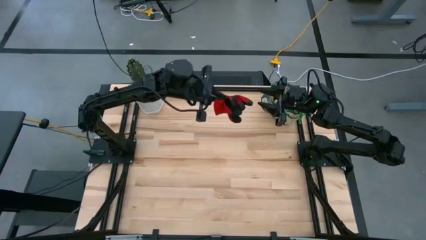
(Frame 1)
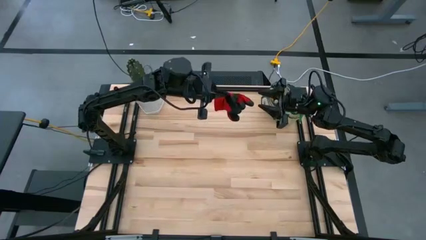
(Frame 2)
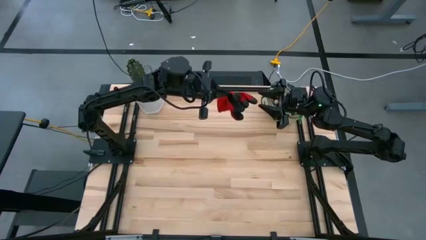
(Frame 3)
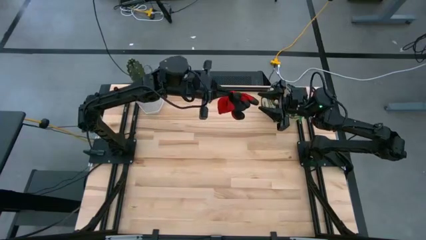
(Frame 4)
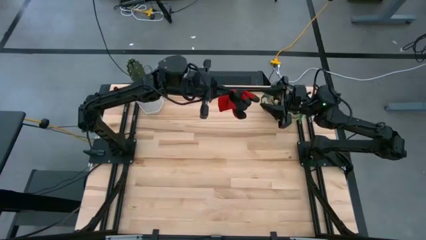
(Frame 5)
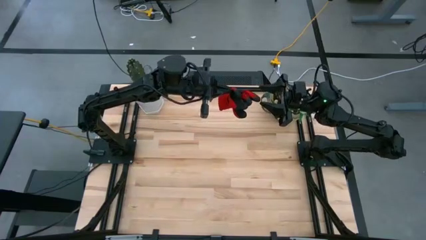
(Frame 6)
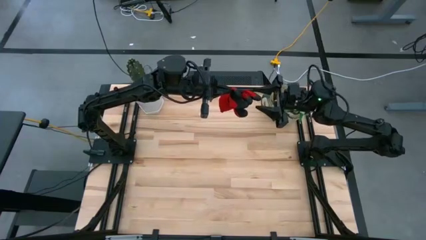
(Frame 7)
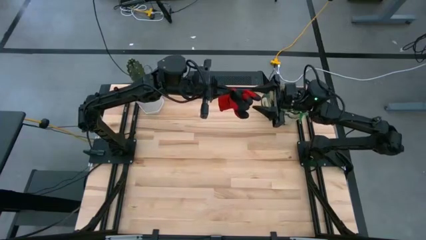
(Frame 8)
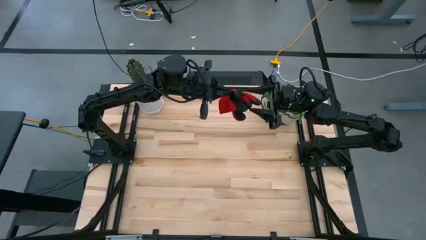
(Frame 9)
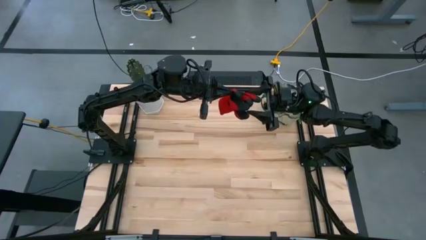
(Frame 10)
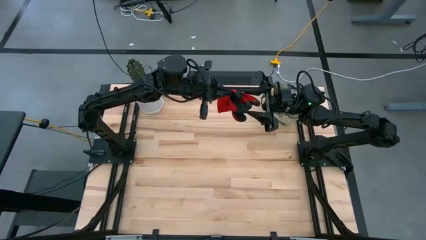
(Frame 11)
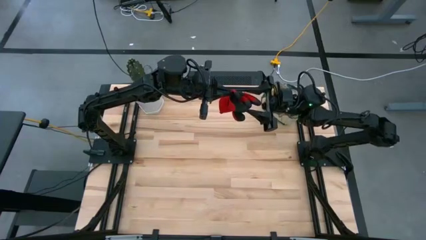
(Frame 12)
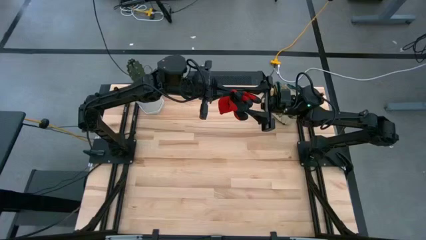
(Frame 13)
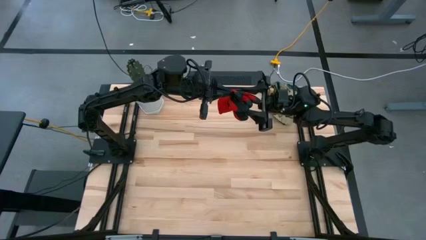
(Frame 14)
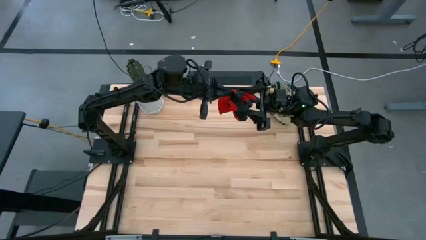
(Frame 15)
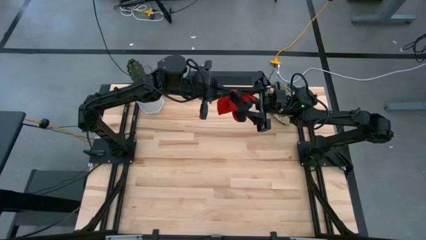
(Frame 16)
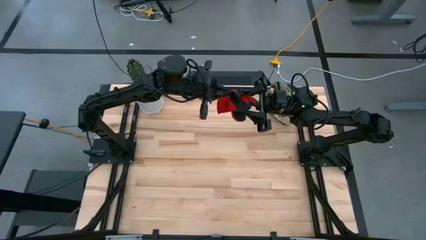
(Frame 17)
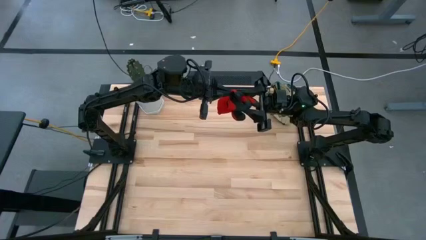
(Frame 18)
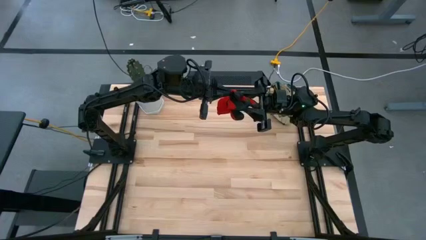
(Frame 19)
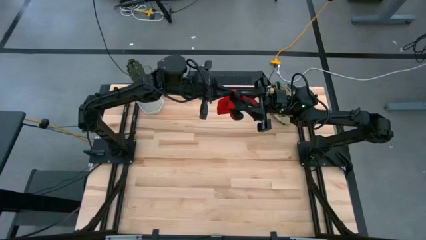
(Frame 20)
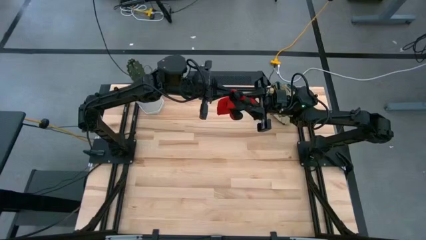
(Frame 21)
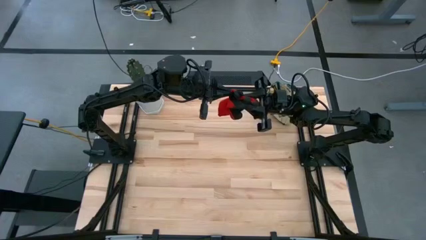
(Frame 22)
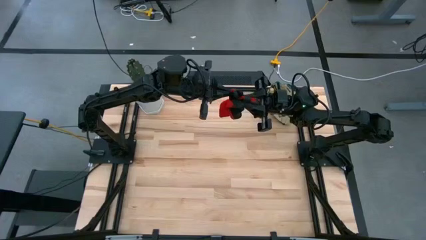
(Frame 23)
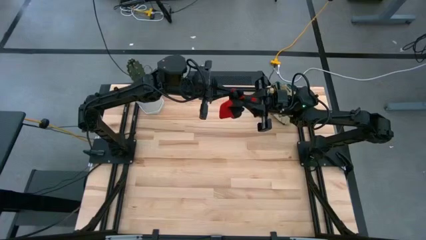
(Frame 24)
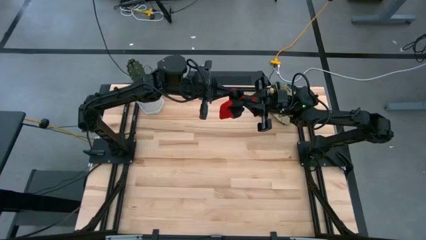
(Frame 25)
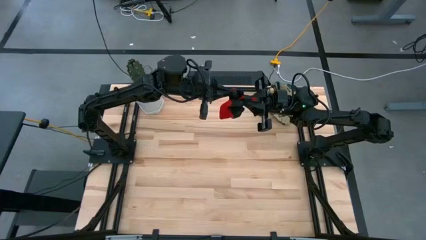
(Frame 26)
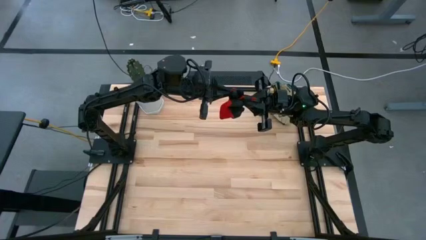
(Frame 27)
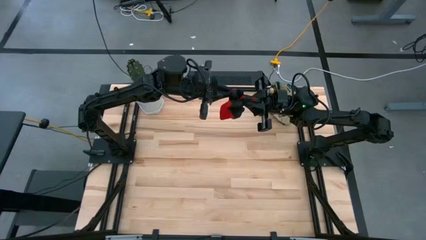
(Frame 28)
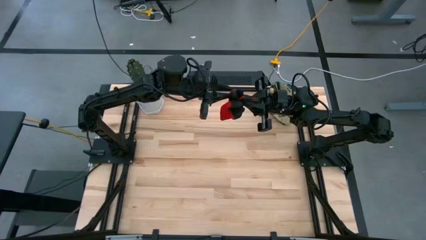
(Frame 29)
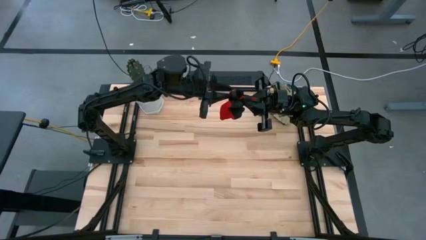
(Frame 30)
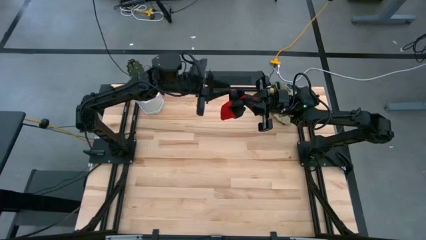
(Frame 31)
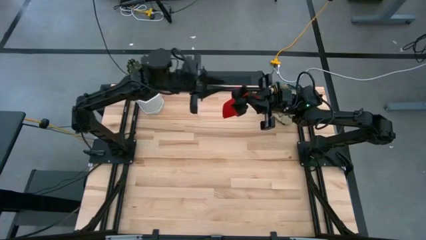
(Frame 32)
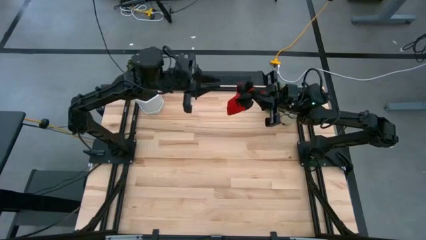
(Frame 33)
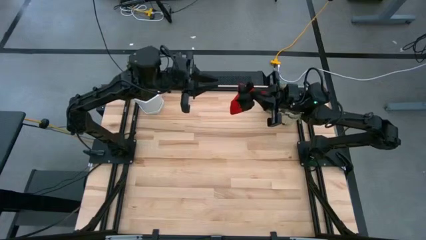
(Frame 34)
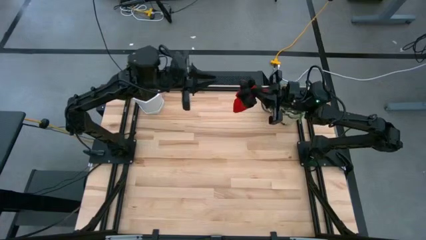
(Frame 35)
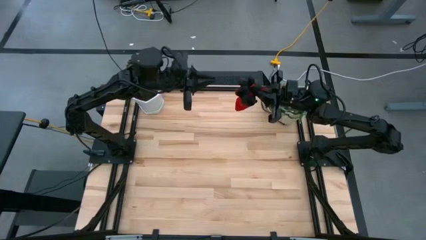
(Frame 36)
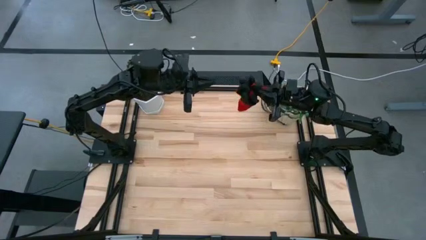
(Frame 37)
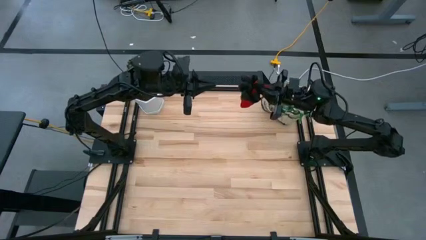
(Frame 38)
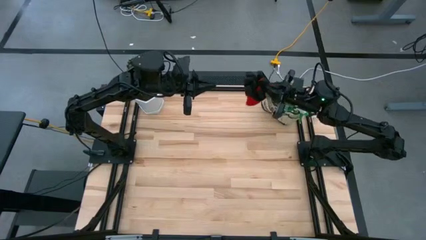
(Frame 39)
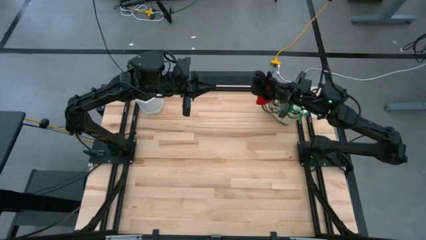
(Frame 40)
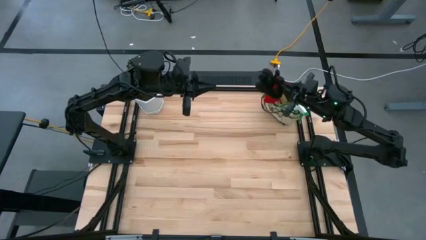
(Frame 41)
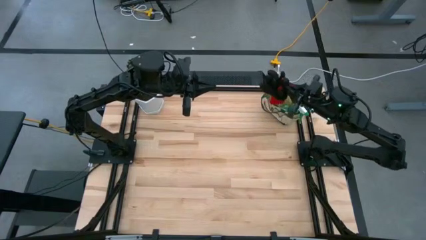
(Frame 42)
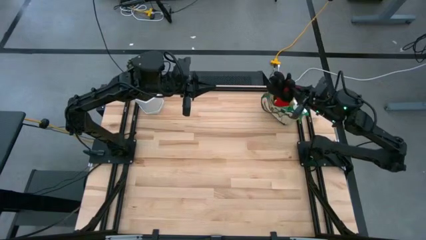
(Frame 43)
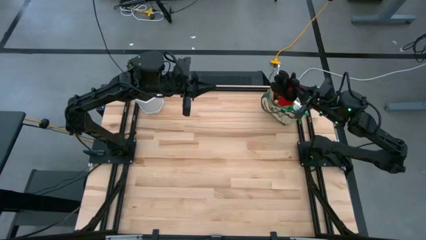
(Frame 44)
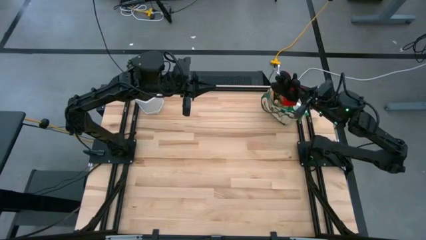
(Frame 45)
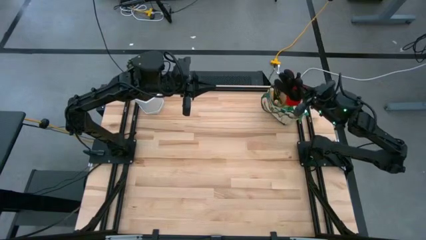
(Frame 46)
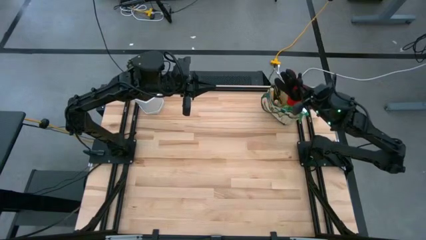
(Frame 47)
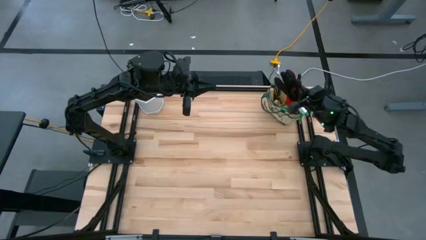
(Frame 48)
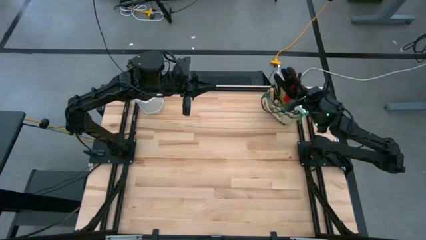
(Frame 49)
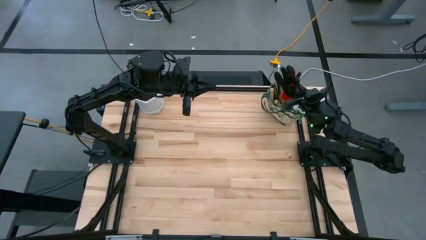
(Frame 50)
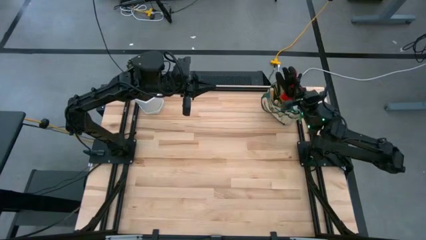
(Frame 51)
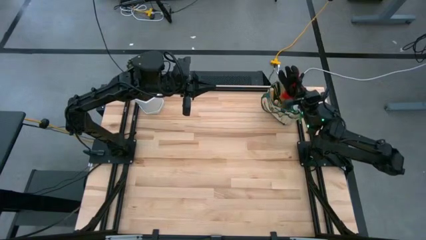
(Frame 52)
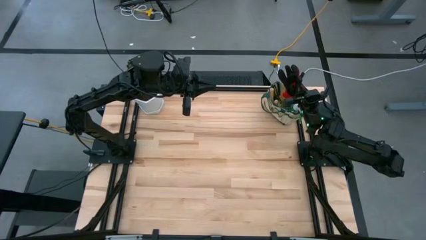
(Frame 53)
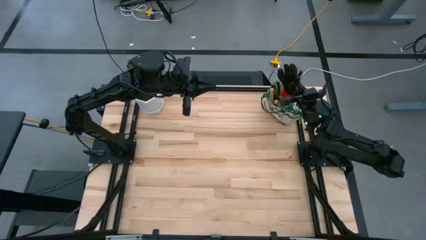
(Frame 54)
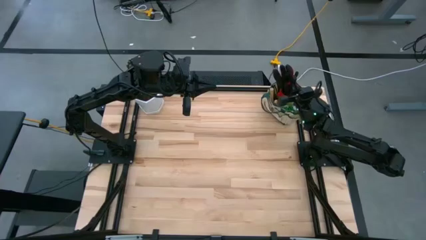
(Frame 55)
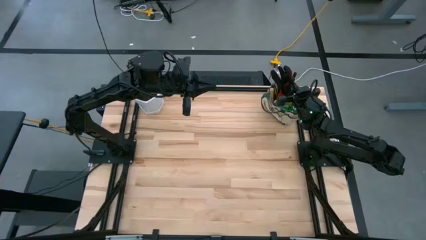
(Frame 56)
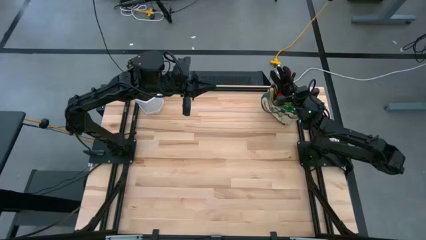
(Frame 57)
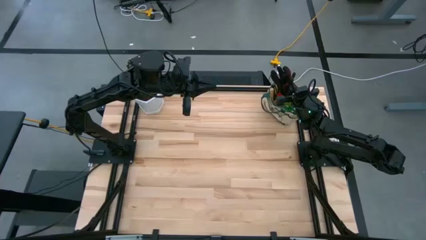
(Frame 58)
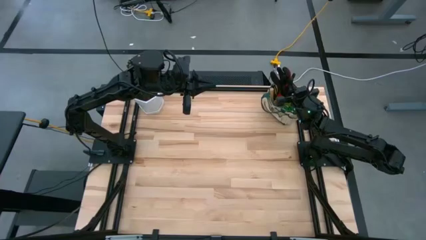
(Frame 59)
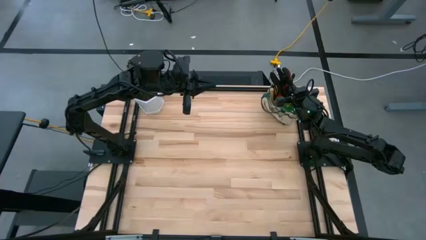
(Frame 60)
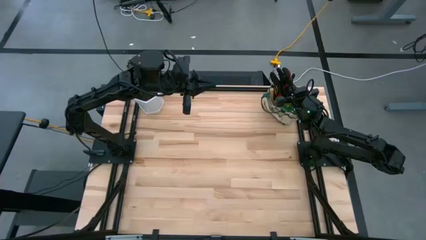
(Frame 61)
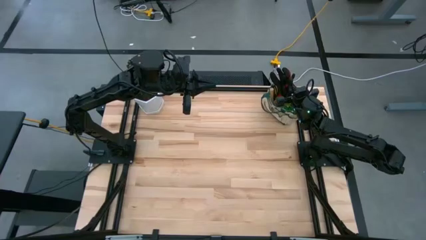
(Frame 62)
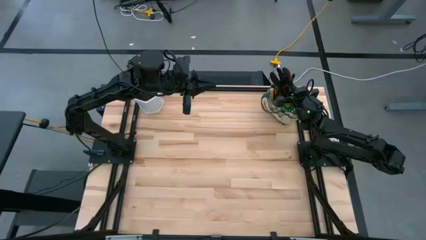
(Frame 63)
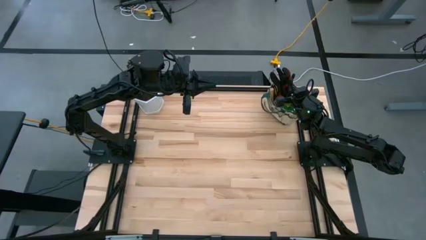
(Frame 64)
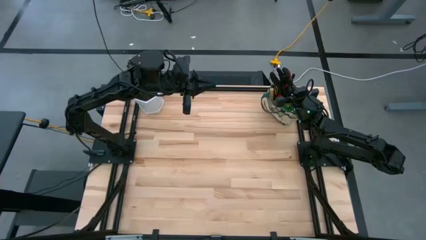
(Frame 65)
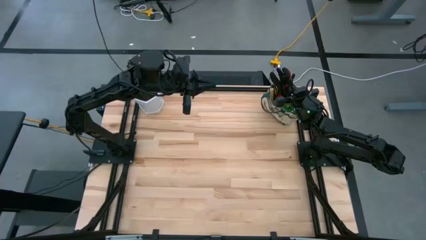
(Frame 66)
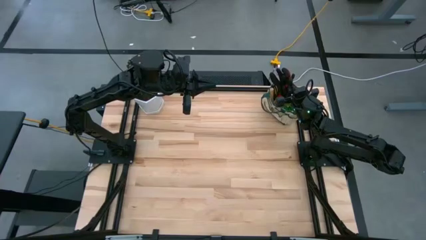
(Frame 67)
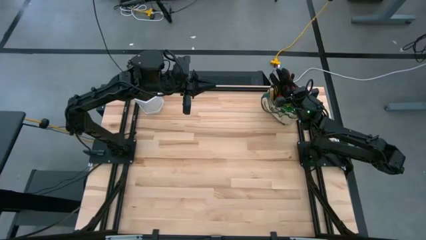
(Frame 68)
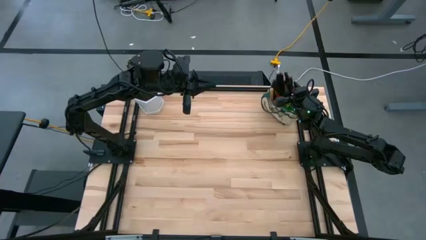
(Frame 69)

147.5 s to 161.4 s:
Task: Pick & Place Garden tools in Gardening bag
Put the red gloves into the white gardening bag

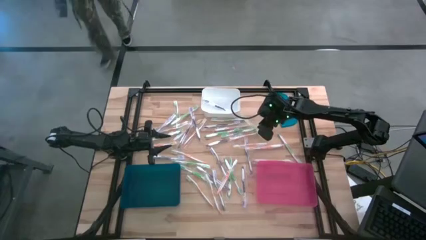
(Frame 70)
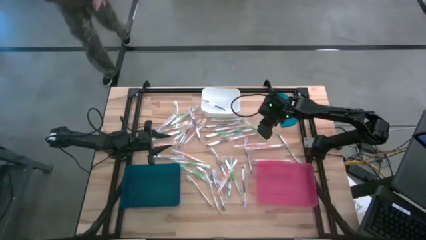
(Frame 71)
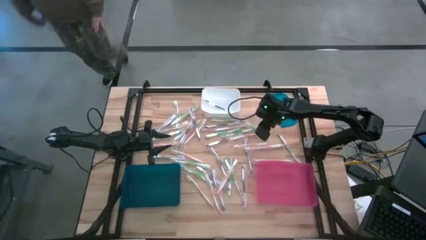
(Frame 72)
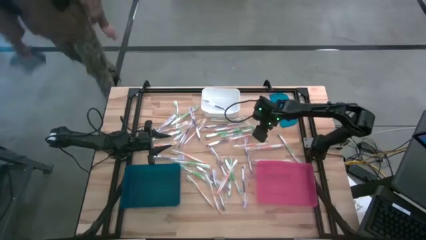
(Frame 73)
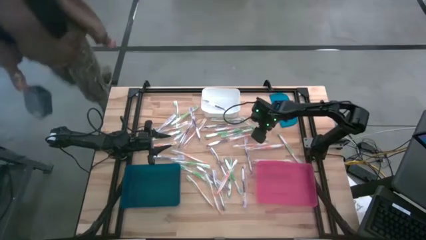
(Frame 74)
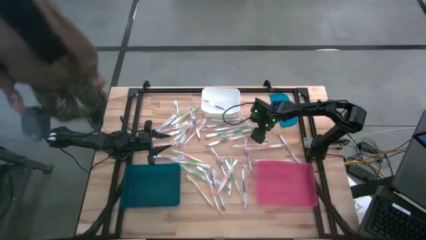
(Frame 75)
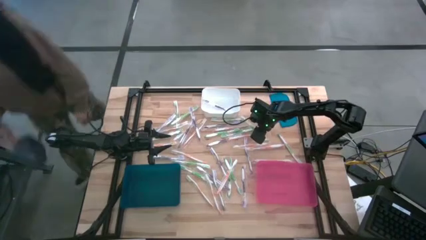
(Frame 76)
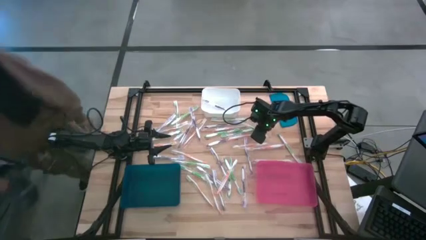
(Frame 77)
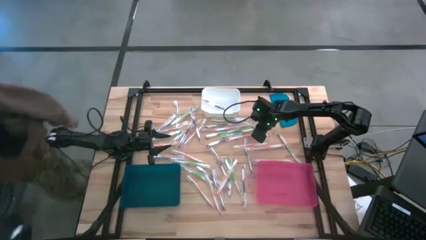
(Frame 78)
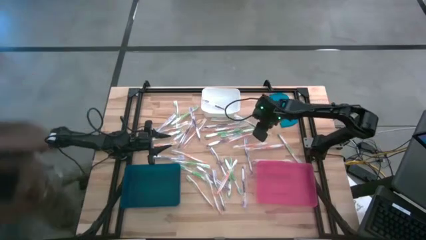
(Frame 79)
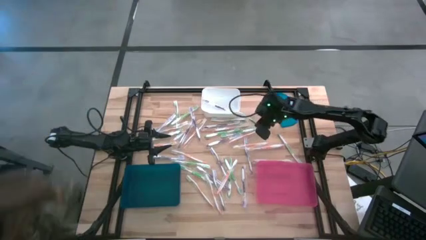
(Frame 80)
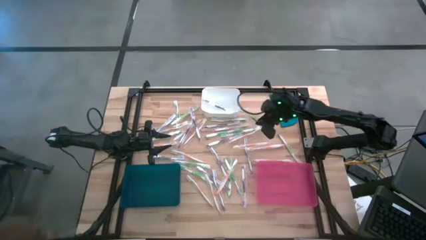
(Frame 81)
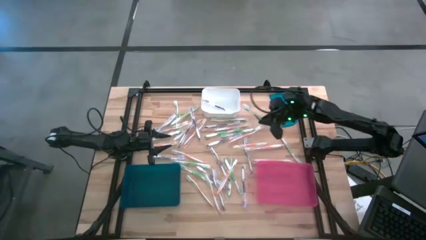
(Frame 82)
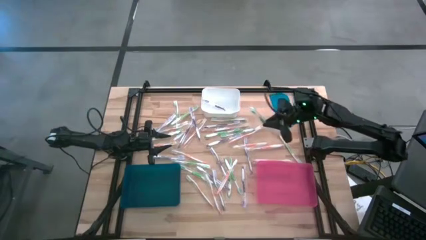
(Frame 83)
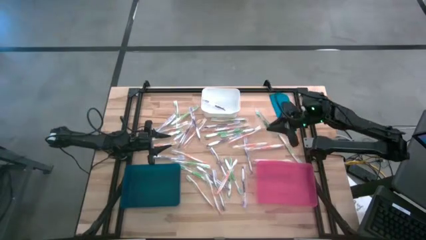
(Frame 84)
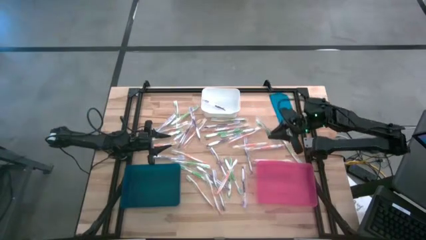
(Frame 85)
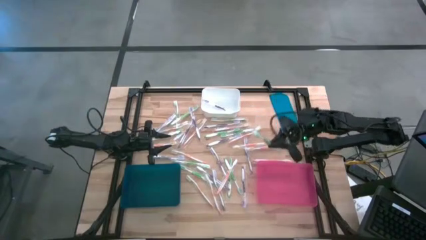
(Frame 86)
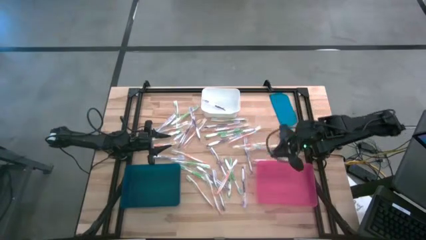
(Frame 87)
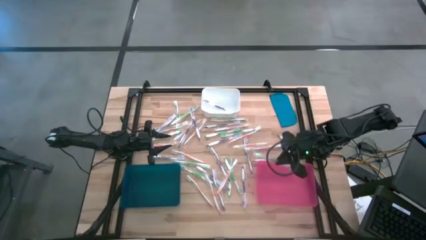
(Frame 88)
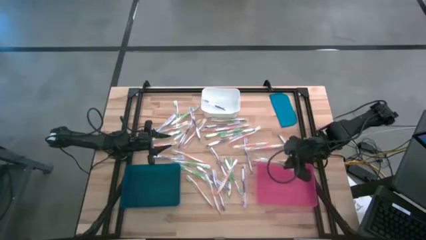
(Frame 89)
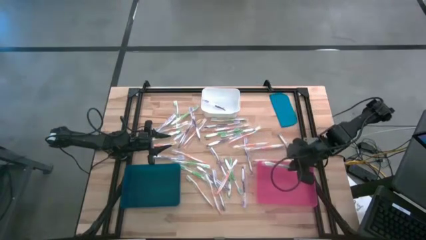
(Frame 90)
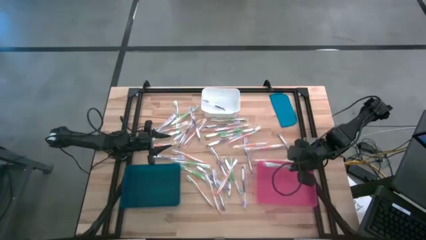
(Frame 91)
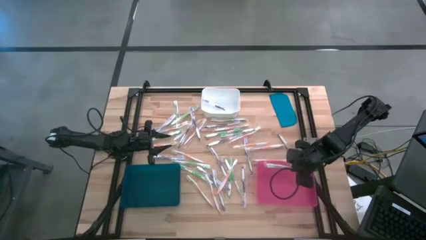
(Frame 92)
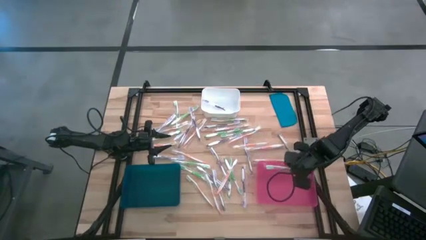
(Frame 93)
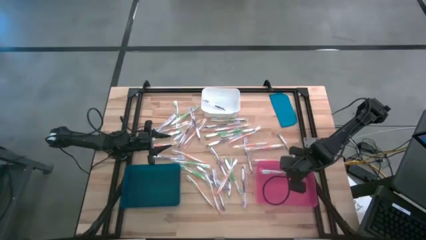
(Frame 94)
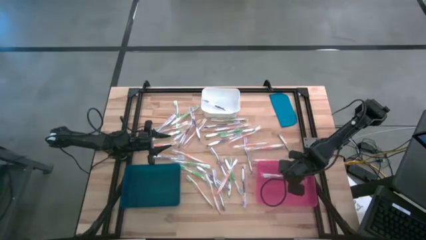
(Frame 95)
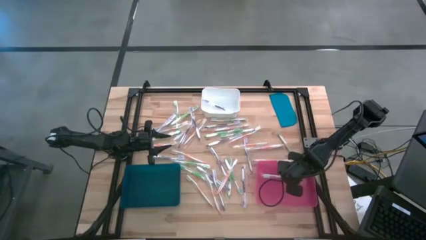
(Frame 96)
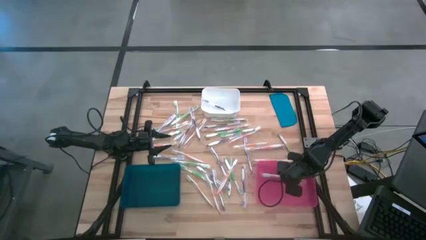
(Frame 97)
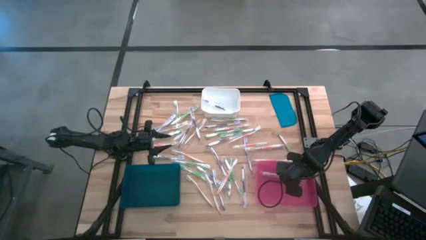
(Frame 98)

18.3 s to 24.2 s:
Task: Pick & Place Toothbrushes
Put the green toothbrush into the pink bin
